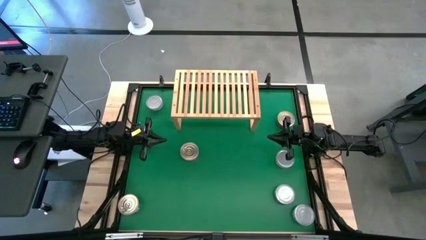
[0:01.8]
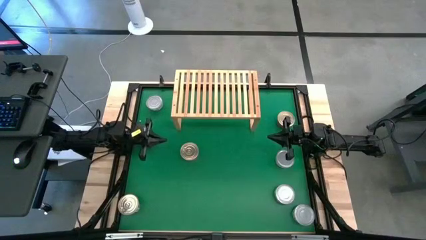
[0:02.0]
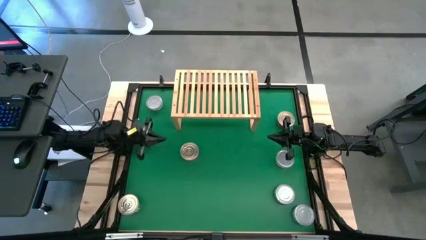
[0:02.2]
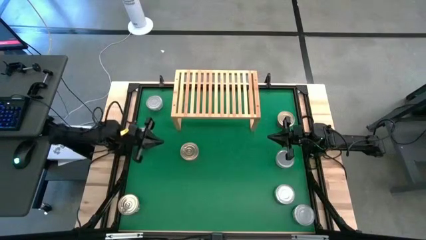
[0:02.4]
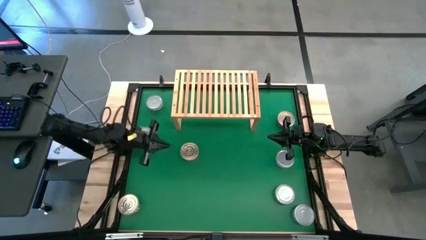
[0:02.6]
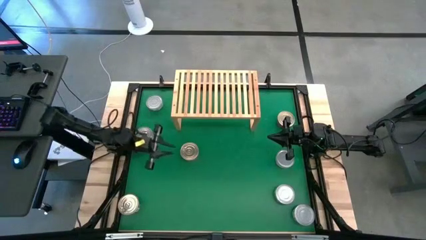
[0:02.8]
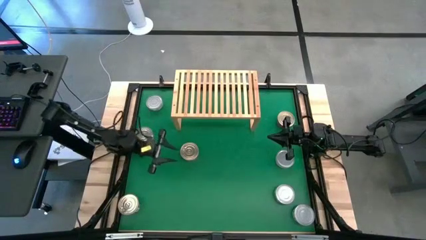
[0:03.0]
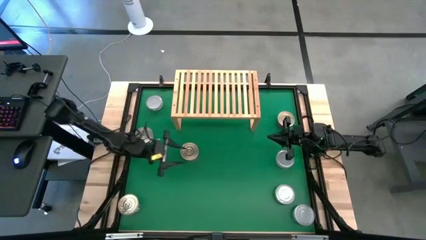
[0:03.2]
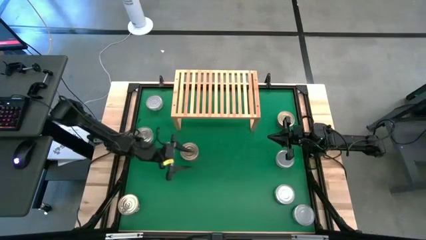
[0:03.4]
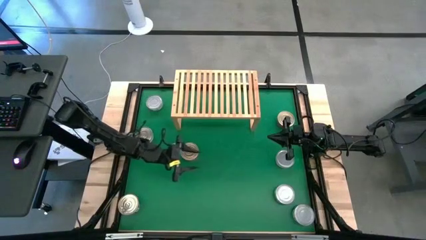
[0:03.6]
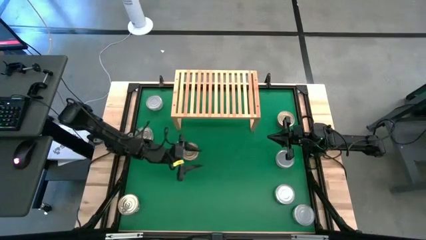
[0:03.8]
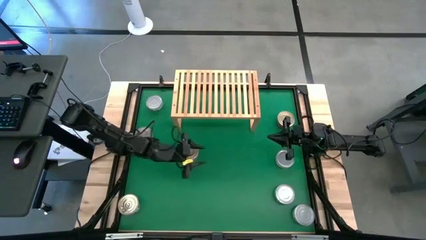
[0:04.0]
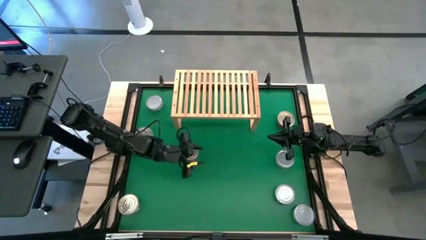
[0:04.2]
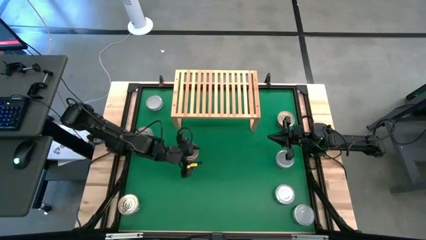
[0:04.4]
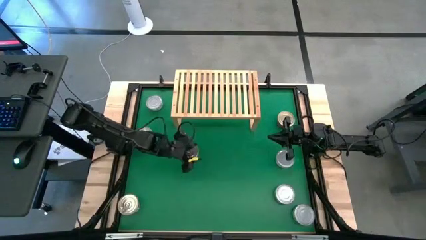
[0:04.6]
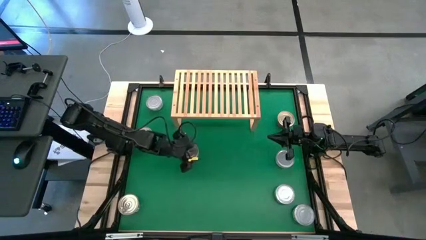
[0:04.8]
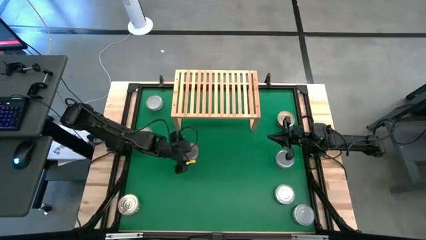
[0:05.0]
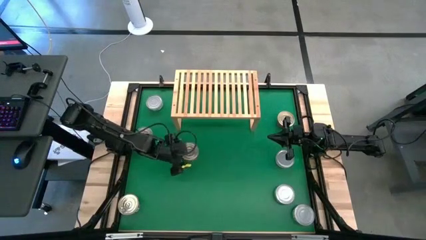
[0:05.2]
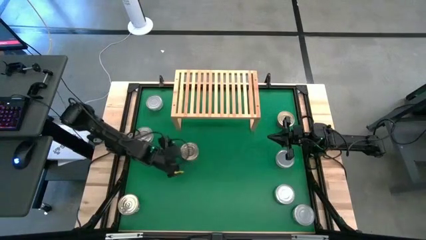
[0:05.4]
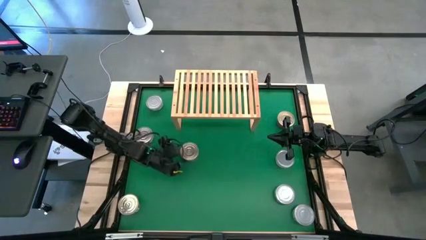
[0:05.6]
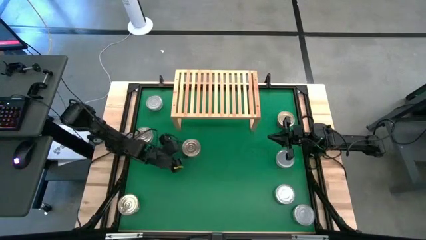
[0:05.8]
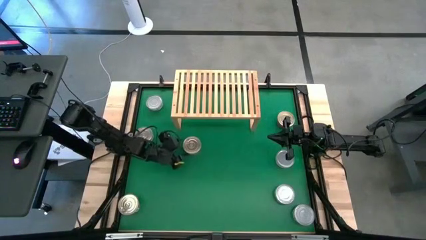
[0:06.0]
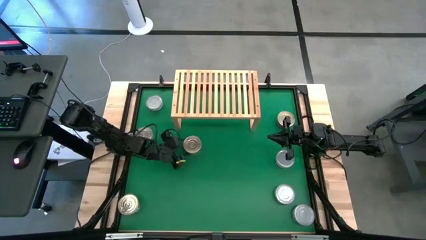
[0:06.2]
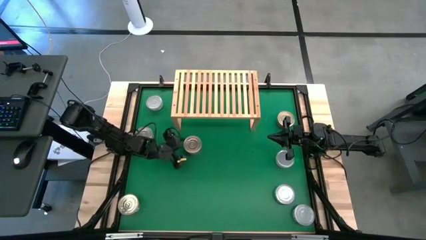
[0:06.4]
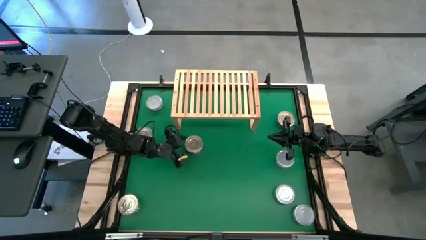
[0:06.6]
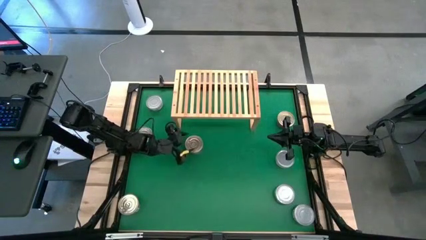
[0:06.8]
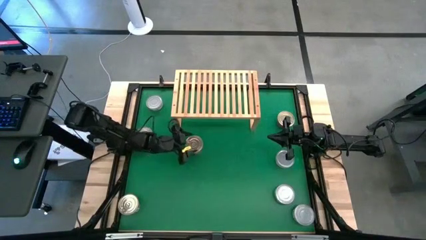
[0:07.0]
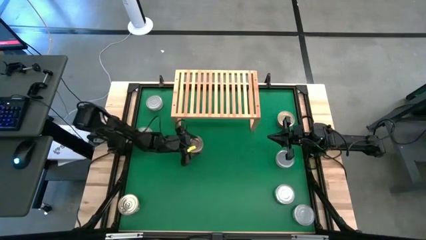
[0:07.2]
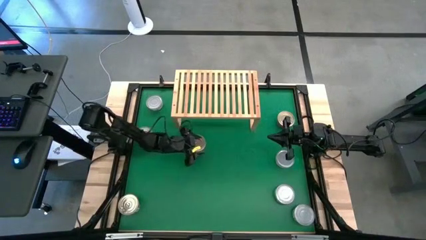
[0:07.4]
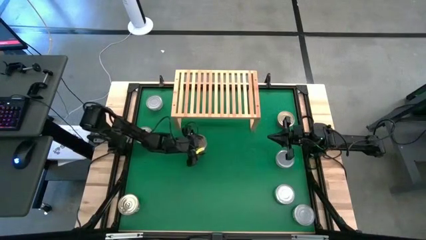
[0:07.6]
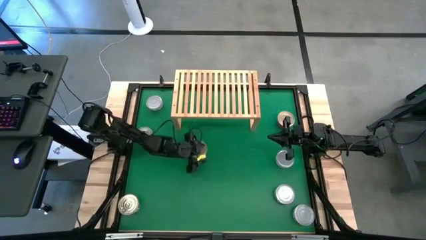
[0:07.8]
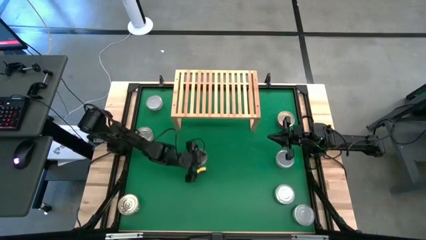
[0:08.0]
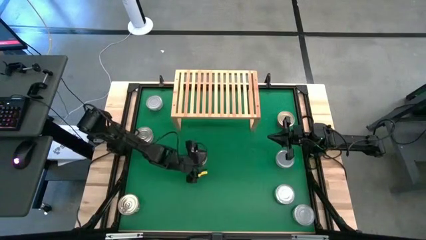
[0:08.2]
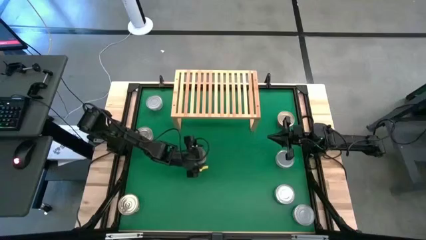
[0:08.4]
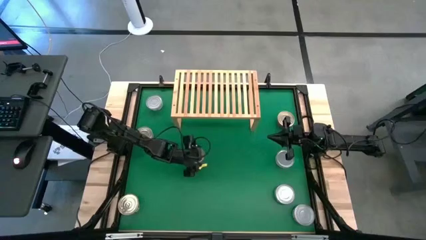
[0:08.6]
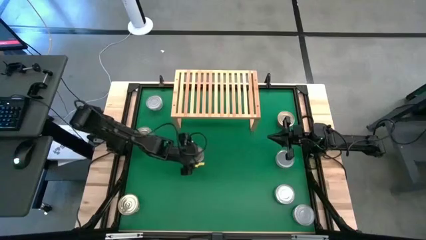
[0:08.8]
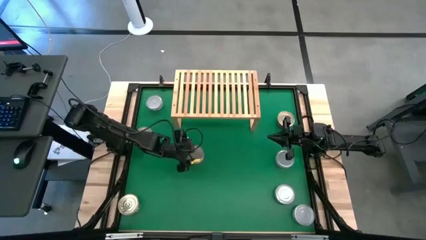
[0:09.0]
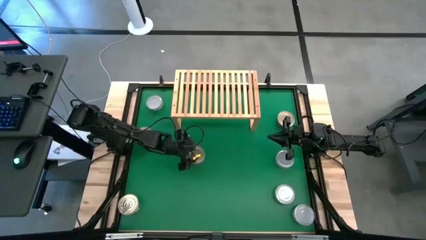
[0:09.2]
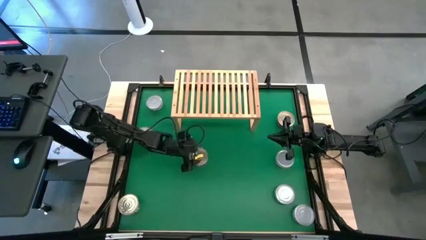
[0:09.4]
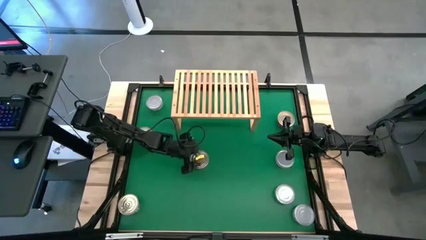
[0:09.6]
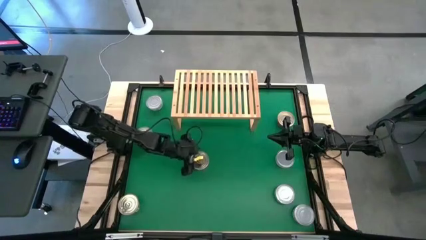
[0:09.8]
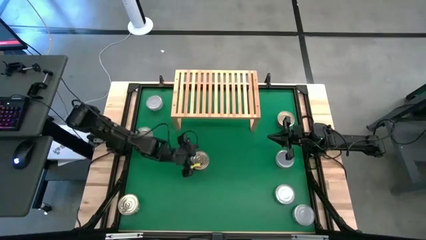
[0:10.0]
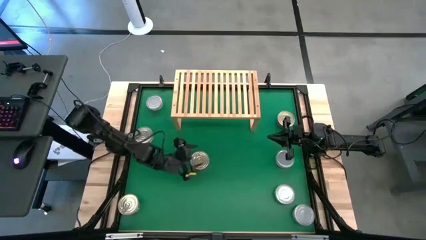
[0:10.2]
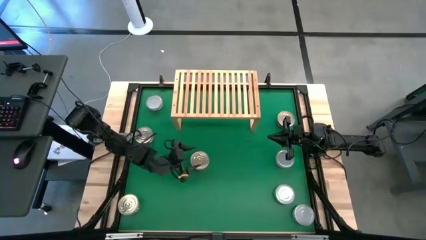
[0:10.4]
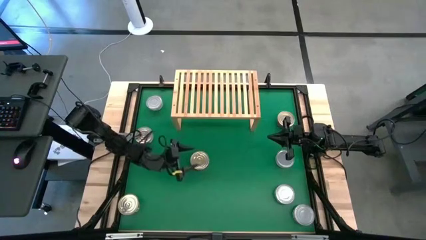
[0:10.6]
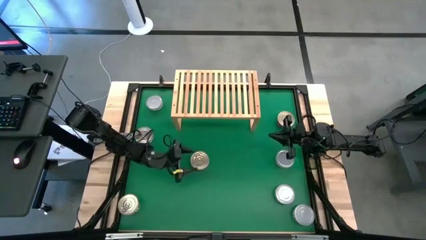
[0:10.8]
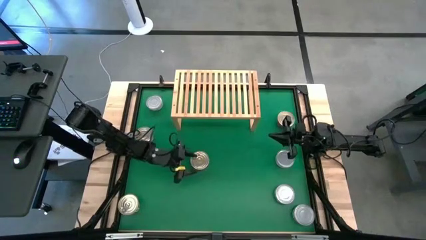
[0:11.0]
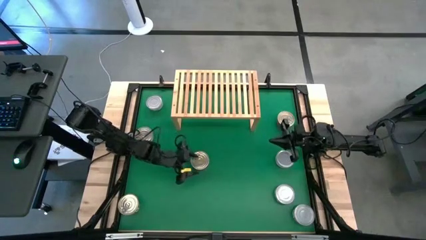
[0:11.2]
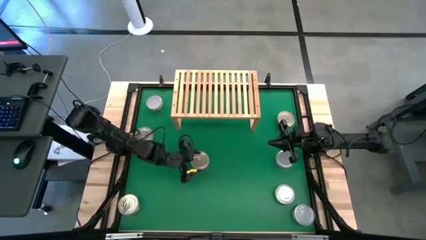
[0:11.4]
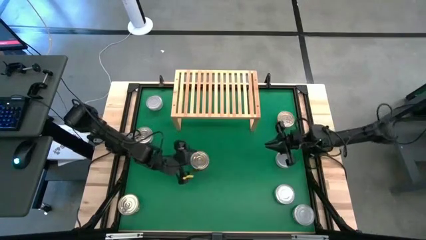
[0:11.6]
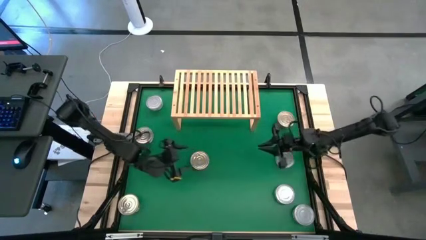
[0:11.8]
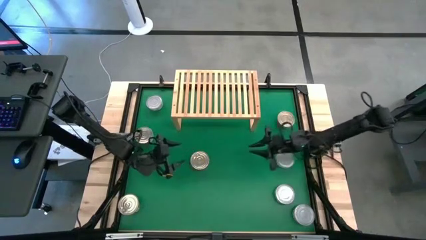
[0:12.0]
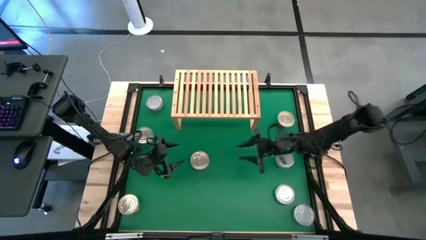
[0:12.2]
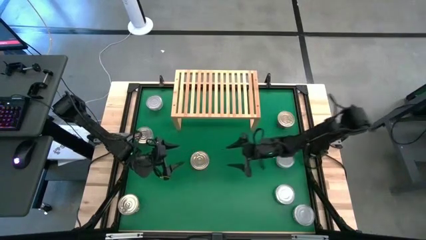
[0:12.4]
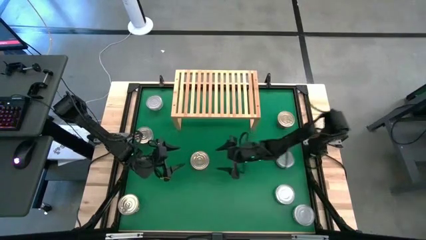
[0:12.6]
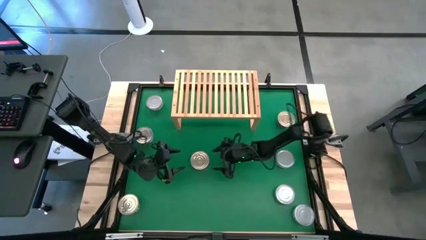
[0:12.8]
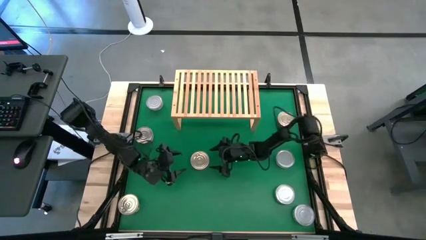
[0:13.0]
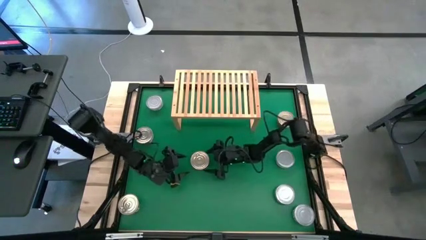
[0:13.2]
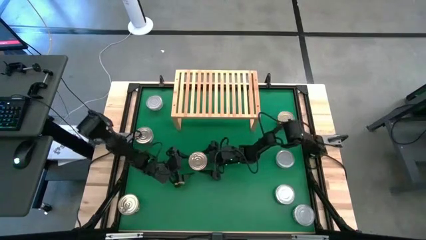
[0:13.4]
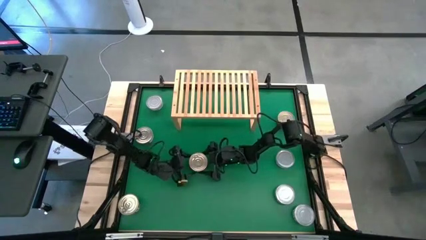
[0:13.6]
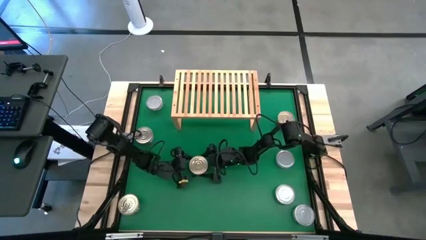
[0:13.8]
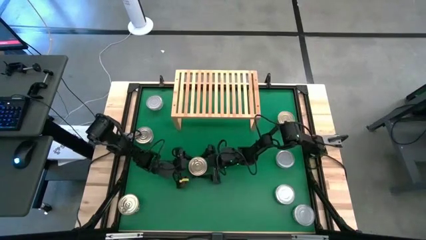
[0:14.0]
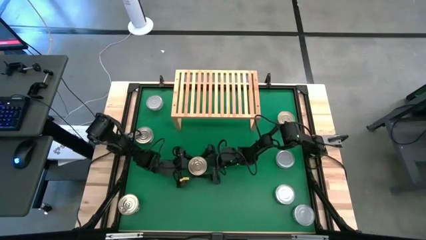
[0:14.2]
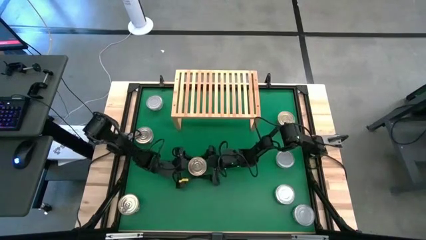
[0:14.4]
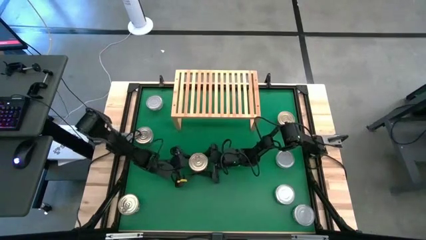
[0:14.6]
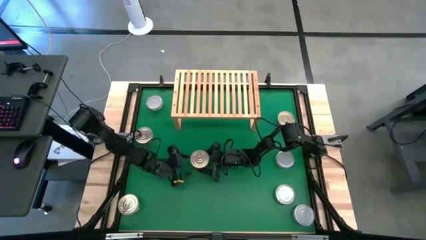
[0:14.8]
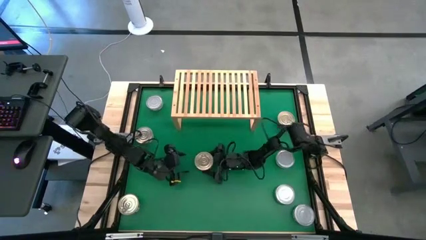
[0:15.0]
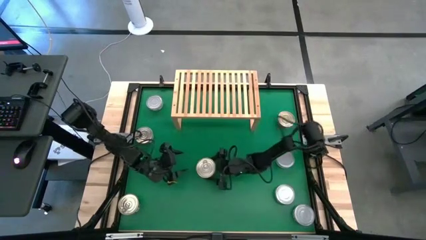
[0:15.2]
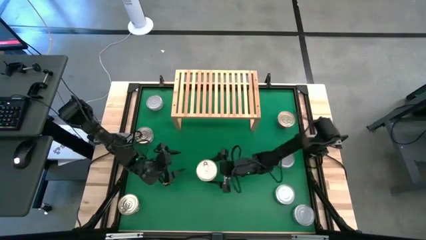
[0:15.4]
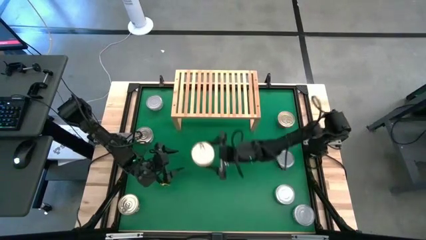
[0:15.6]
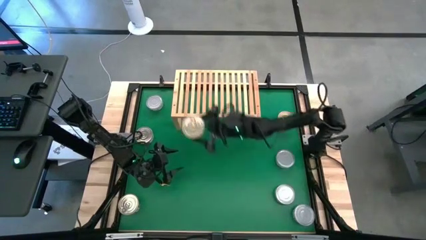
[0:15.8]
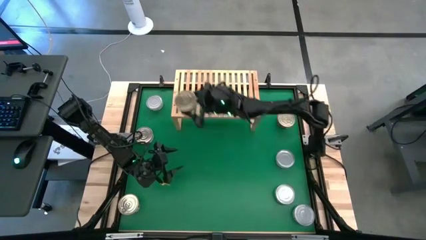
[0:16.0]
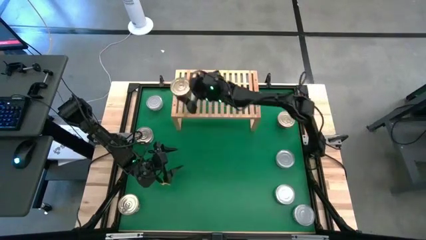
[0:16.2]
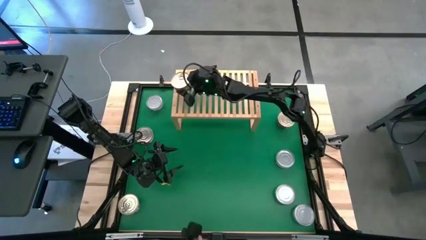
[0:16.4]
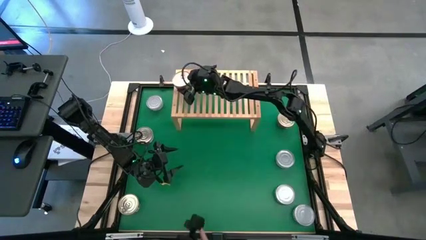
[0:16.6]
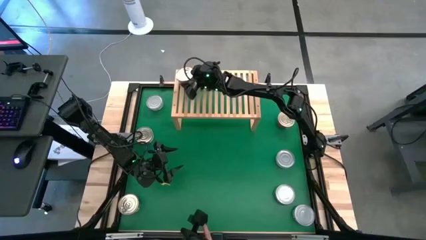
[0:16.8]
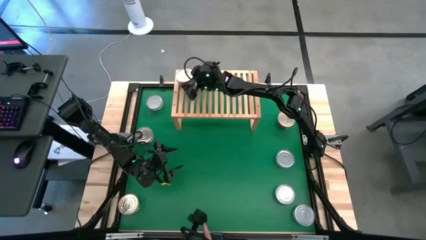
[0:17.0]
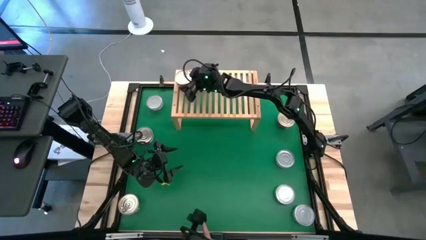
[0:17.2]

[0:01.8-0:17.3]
Task: Stack canned seafood by type on shelf
Put the center blue tuna can on the shelf
